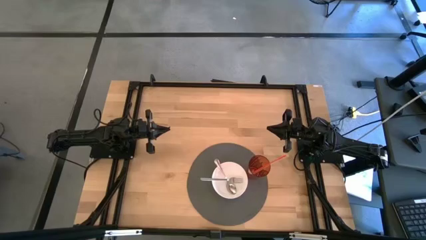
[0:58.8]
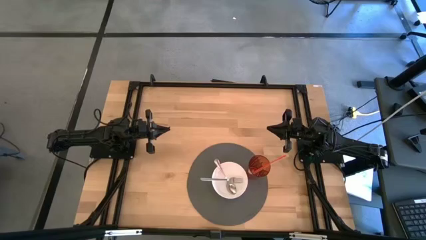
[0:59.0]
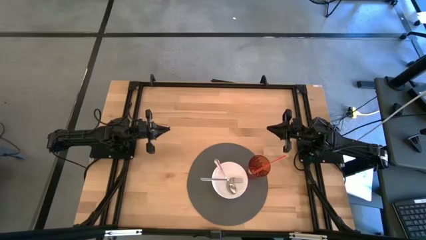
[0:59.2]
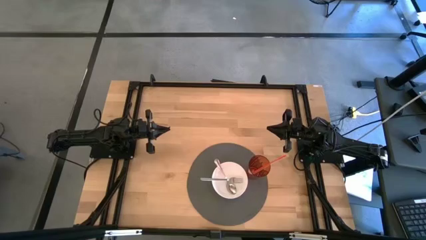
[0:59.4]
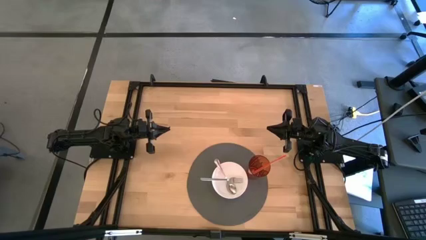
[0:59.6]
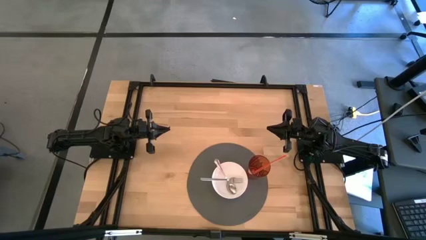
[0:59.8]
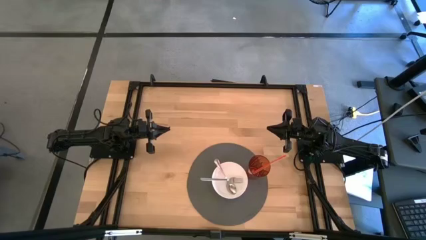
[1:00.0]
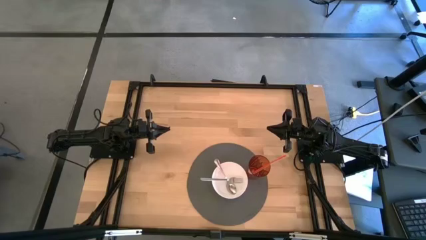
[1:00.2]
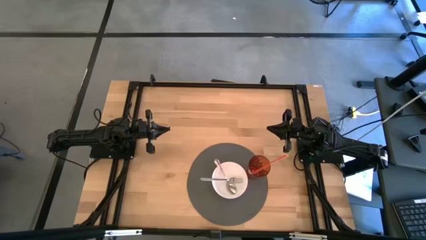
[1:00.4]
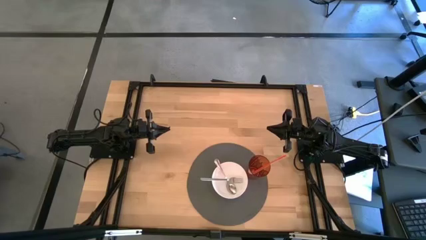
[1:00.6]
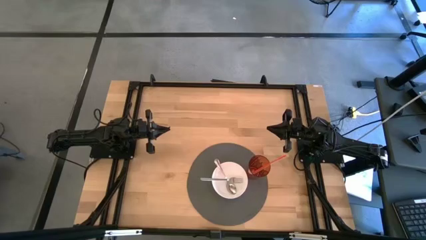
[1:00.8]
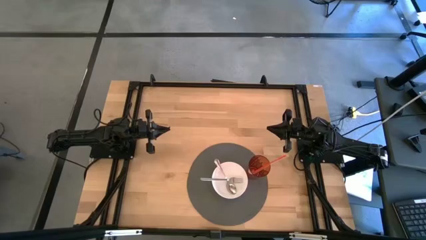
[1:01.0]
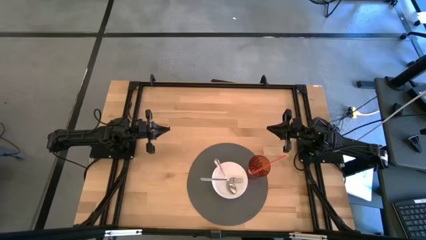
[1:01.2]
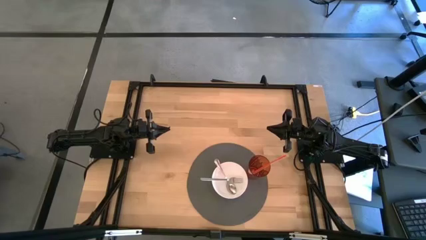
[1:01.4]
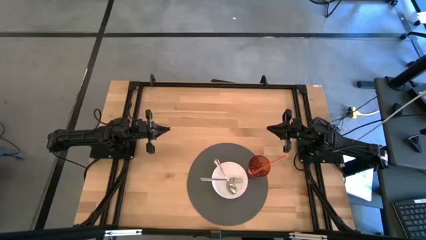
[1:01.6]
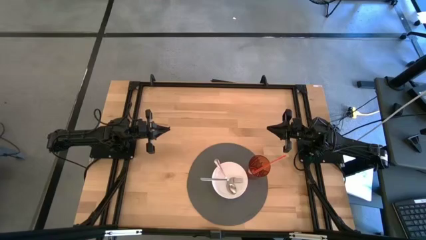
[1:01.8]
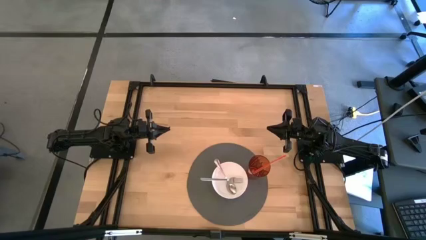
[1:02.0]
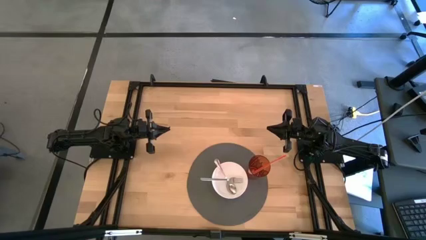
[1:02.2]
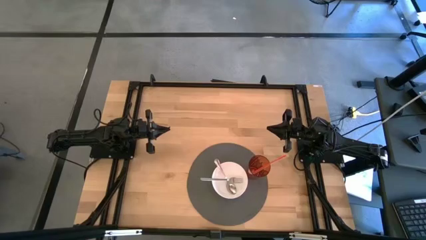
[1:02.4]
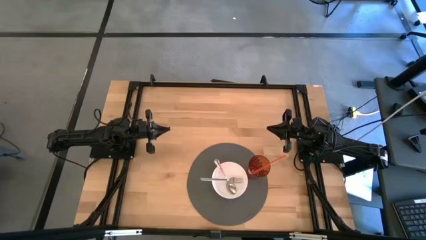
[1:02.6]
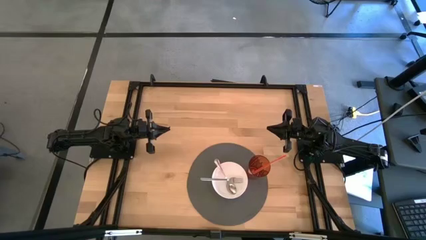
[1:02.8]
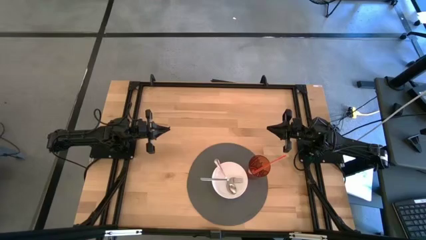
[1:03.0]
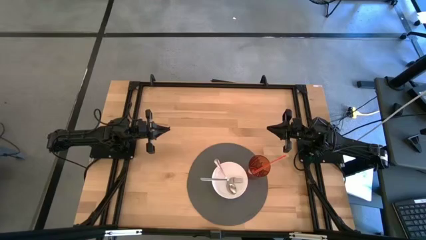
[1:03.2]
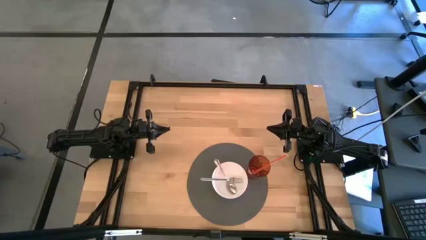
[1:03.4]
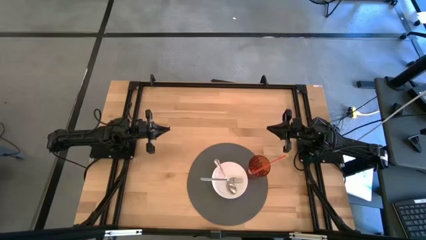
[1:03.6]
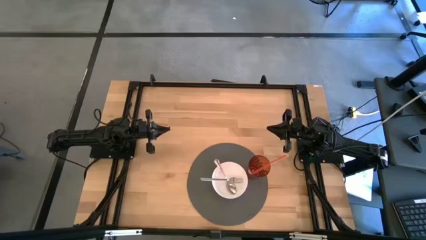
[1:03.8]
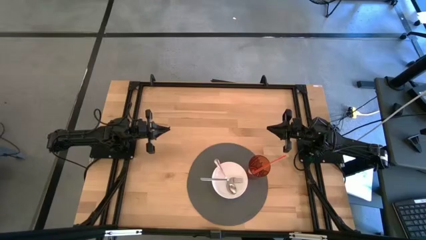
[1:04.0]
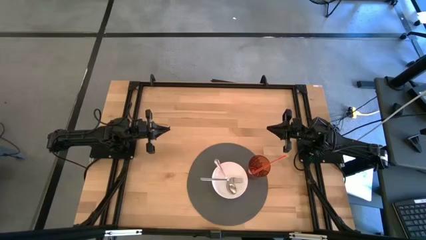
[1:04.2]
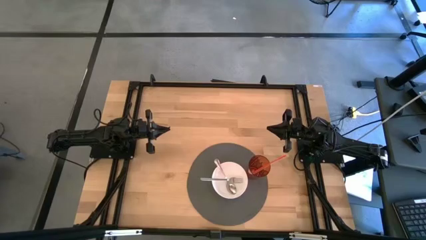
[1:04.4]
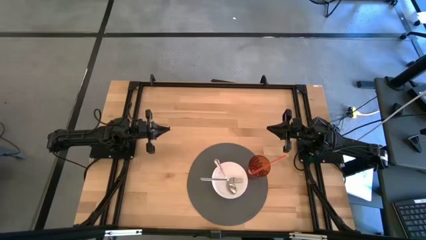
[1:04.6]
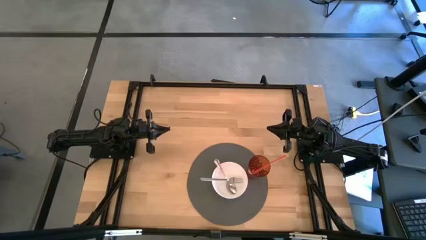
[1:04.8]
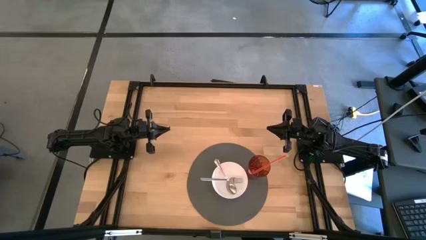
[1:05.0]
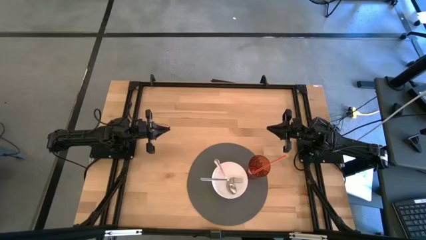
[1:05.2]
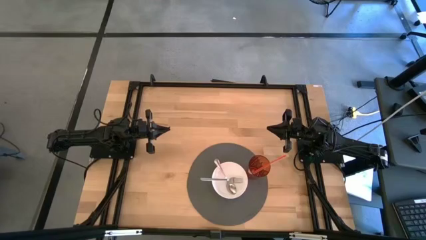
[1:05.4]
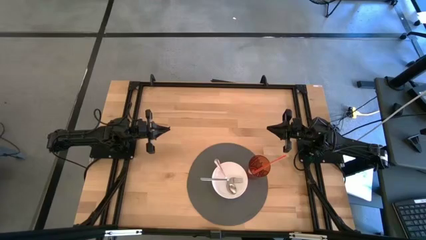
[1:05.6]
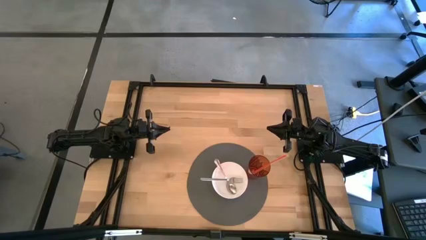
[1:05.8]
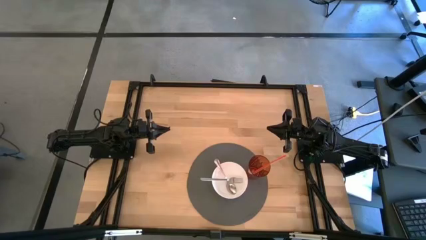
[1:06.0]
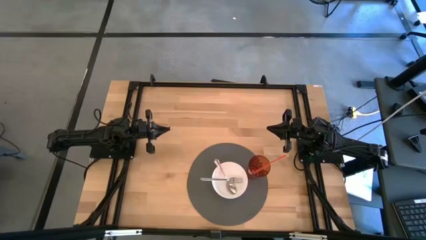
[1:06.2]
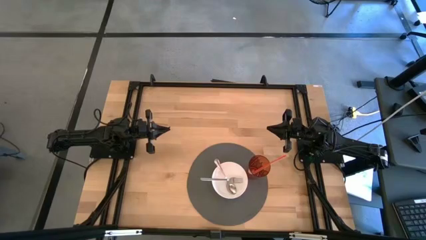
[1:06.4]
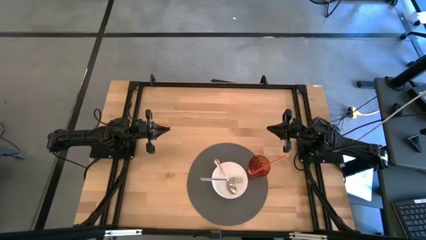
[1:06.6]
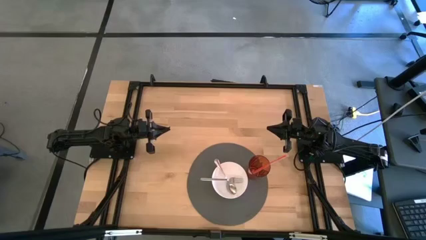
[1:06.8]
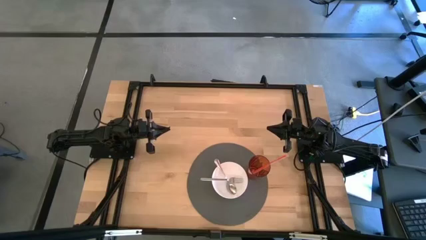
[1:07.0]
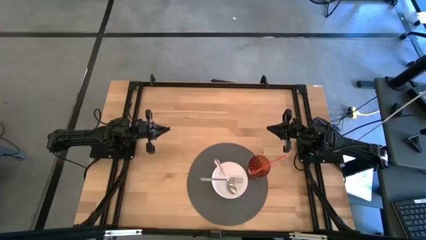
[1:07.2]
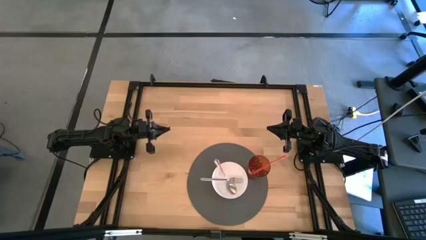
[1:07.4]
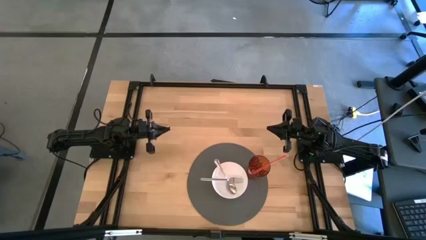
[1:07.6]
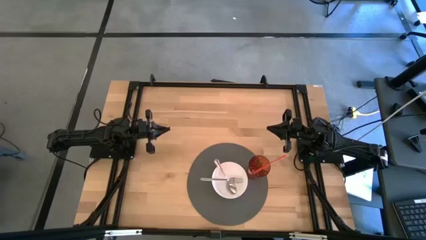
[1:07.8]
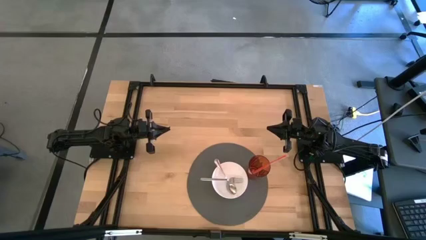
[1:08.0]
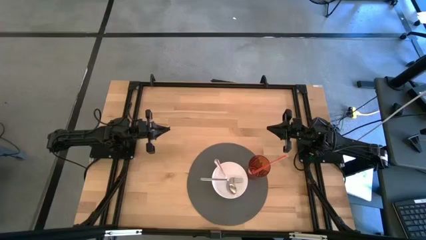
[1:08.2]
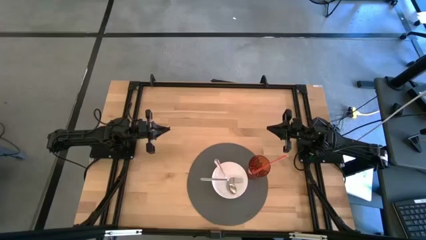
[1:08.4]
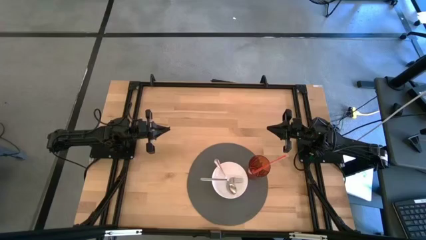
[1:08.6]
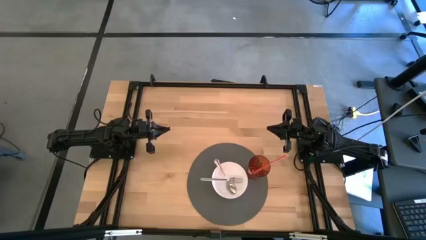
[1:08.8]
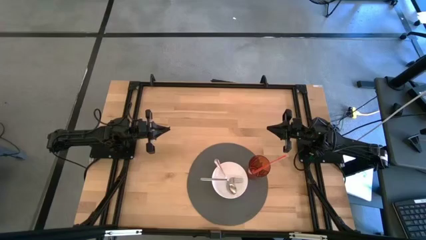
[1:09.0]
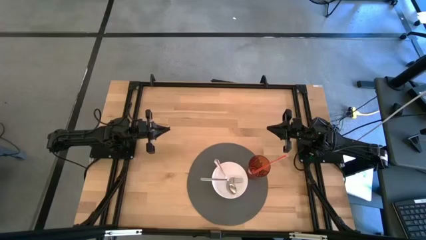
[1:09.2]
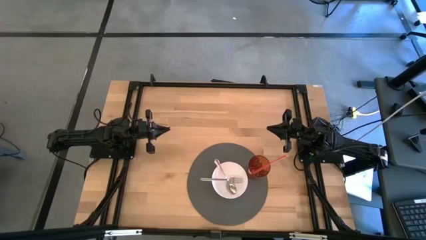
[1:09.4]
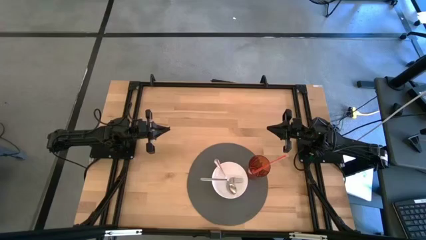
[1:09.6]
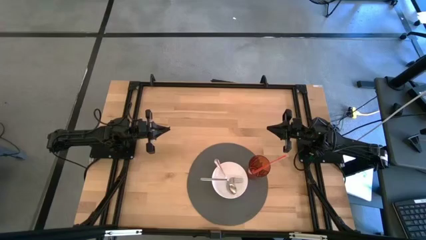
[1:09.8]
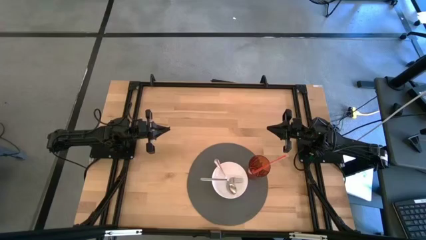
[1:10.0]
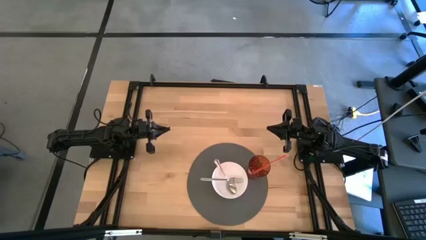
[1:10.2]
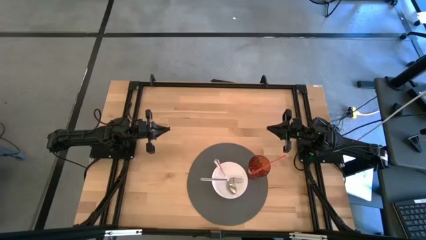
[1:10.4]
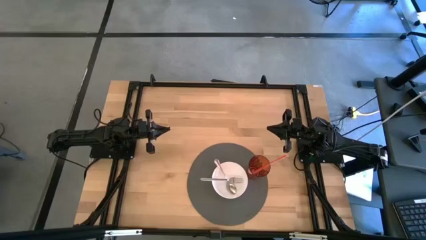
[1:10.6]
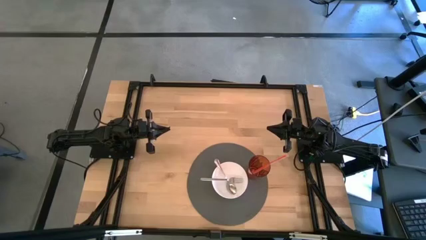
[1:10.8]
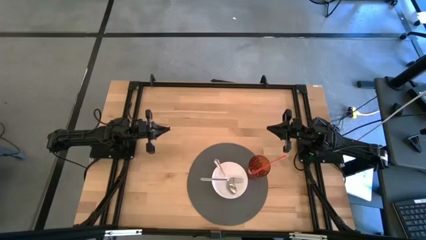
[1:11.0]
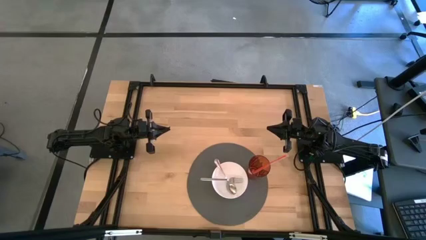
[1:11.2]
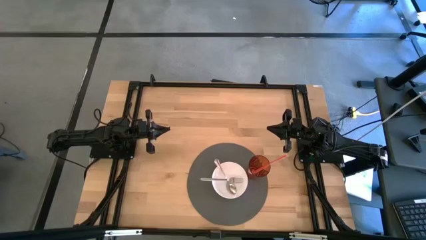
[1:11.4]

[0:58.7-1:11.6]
Task: Pick & Place Utensil
Return to Home Position
